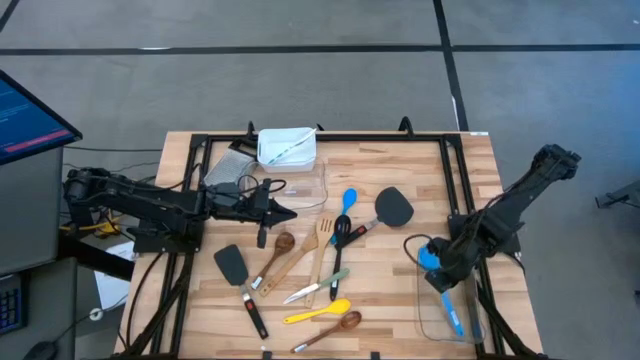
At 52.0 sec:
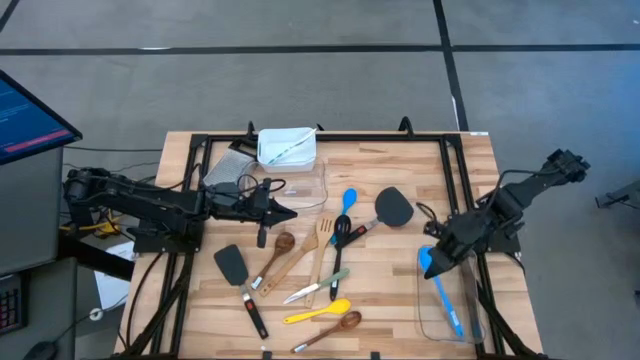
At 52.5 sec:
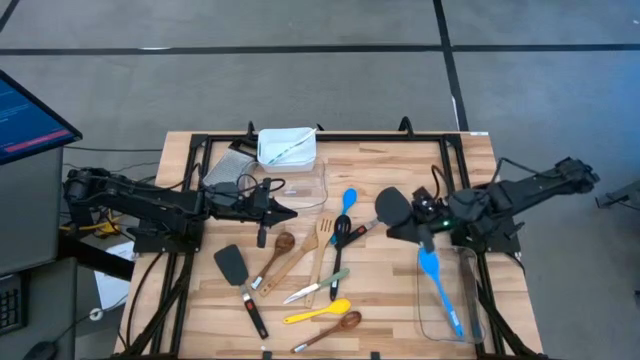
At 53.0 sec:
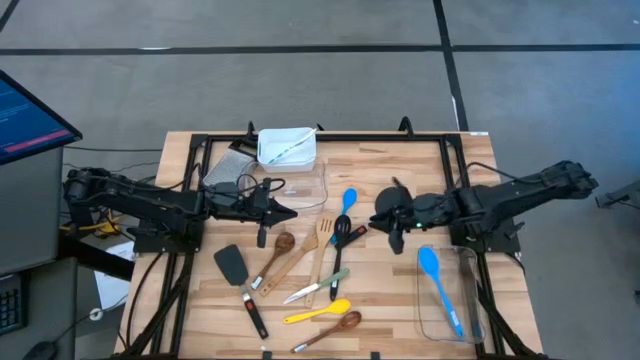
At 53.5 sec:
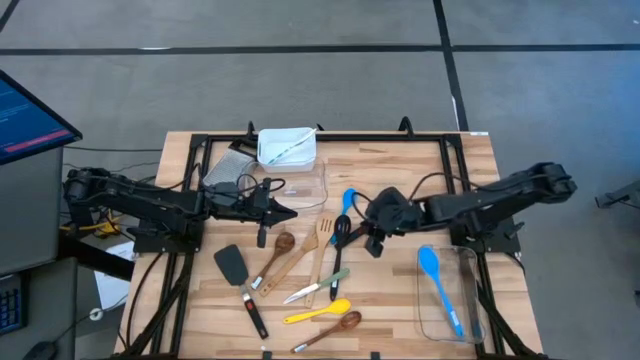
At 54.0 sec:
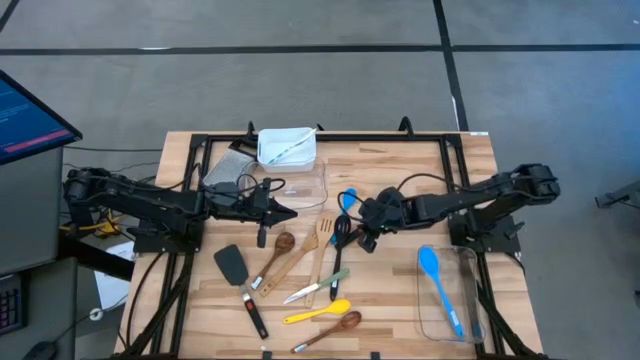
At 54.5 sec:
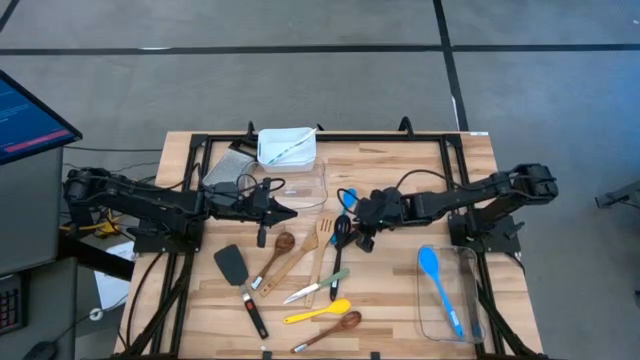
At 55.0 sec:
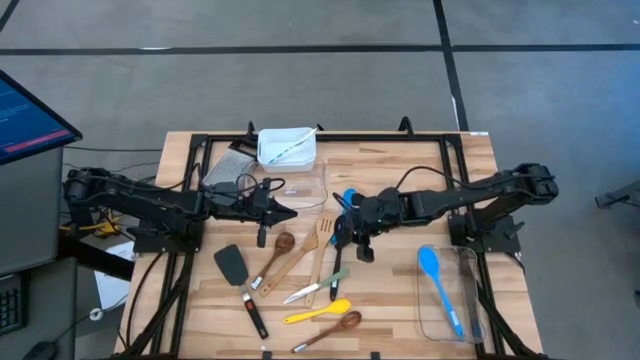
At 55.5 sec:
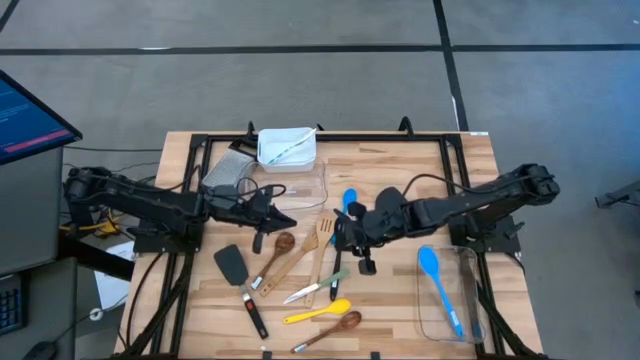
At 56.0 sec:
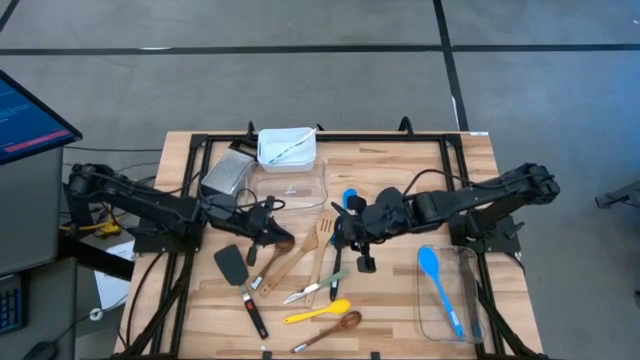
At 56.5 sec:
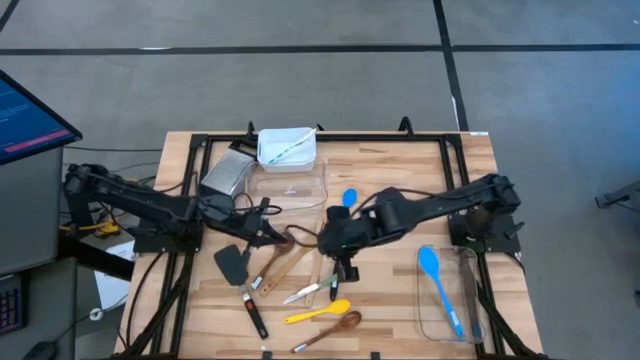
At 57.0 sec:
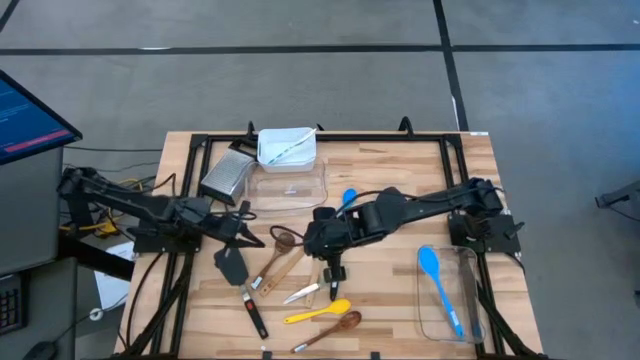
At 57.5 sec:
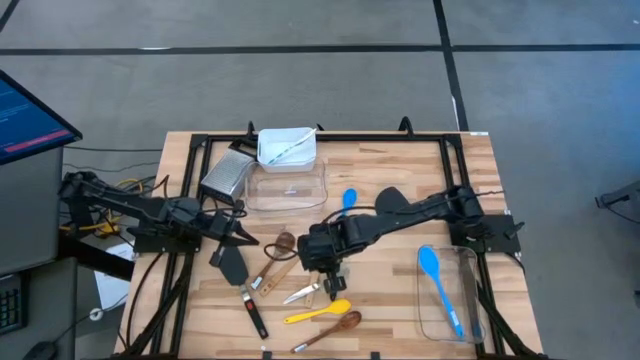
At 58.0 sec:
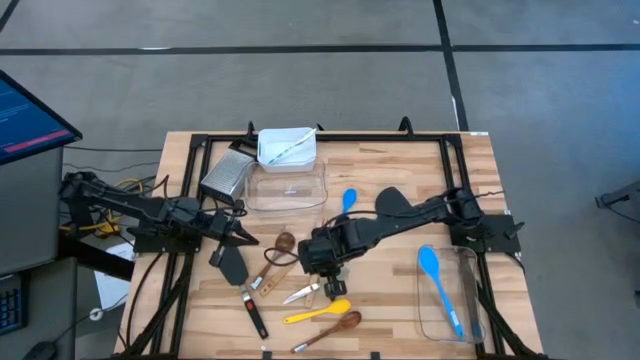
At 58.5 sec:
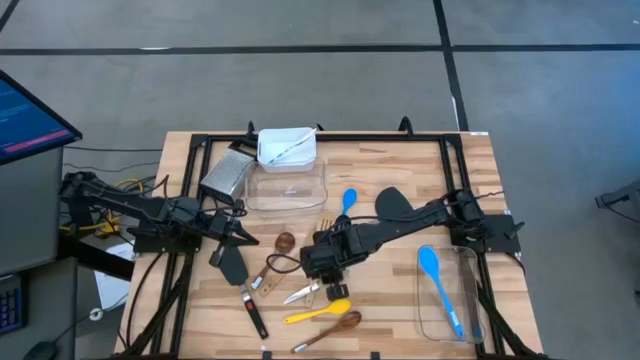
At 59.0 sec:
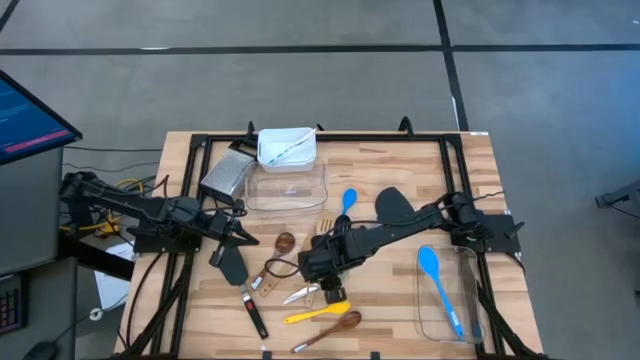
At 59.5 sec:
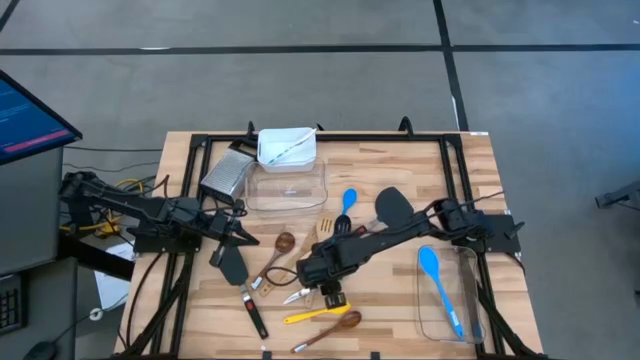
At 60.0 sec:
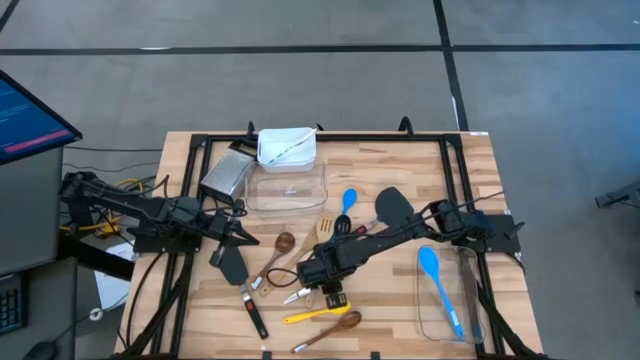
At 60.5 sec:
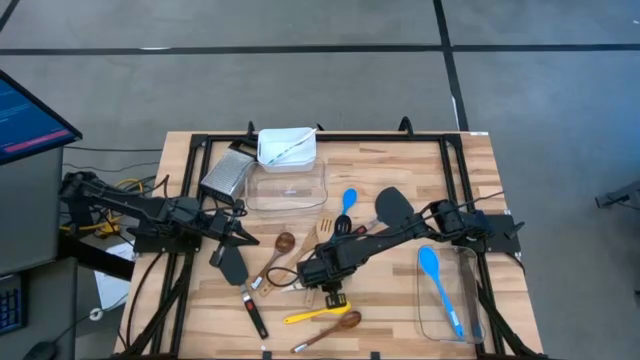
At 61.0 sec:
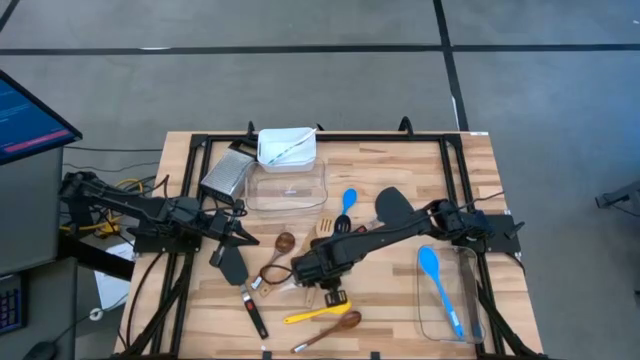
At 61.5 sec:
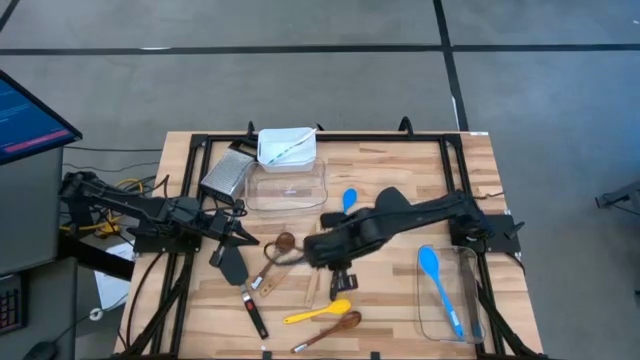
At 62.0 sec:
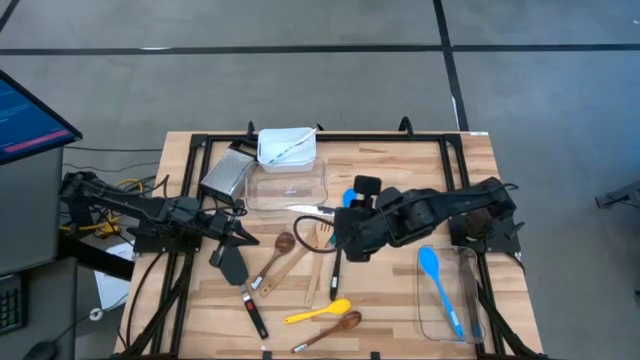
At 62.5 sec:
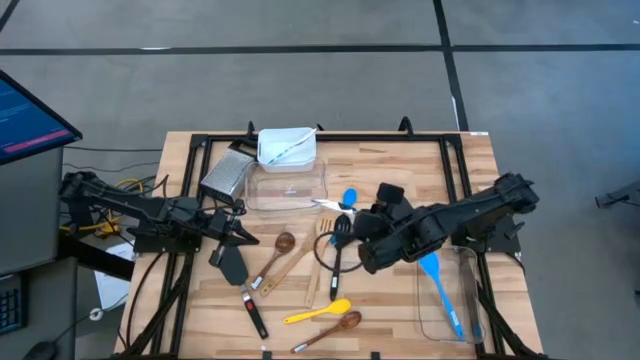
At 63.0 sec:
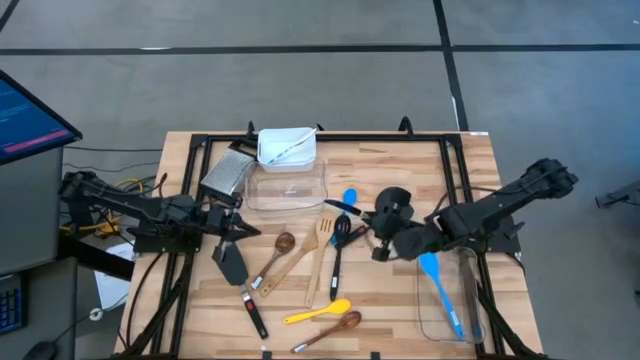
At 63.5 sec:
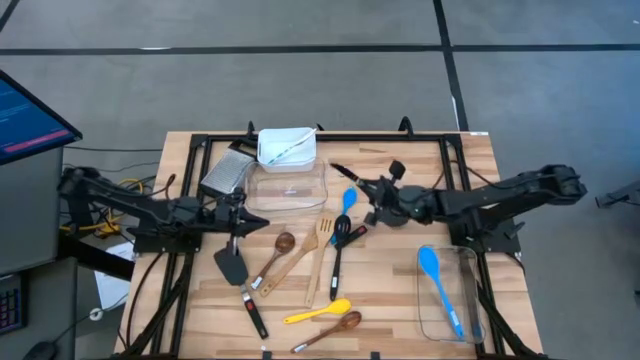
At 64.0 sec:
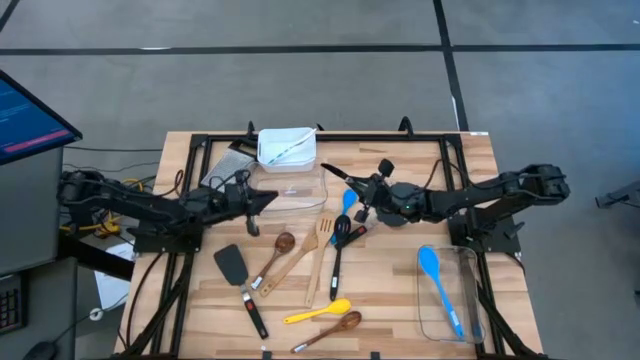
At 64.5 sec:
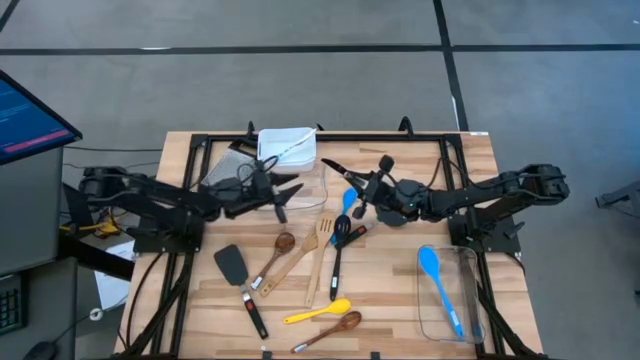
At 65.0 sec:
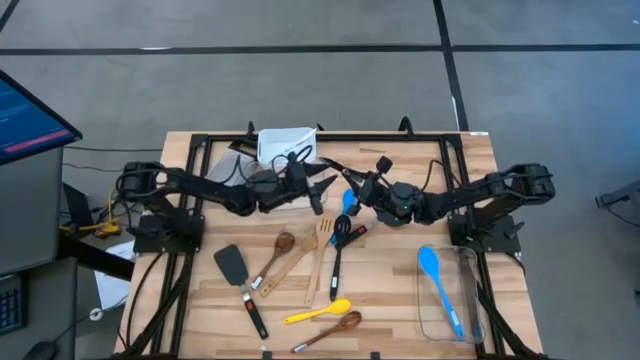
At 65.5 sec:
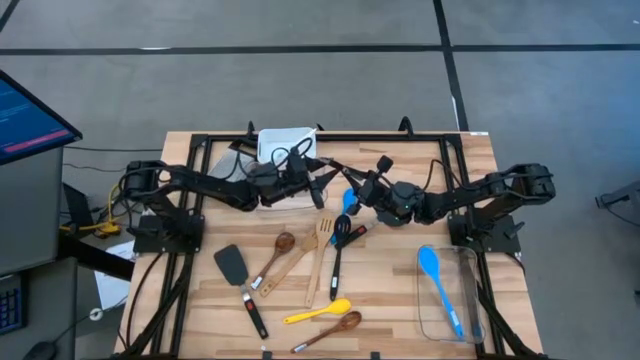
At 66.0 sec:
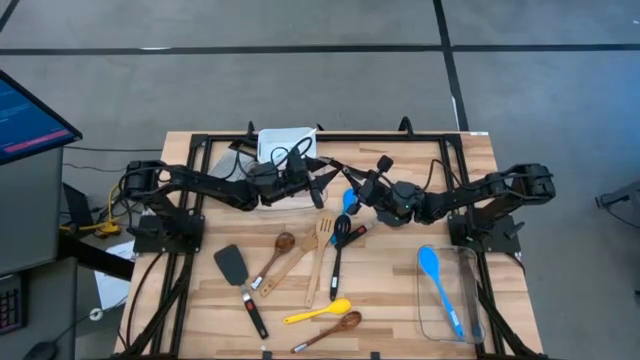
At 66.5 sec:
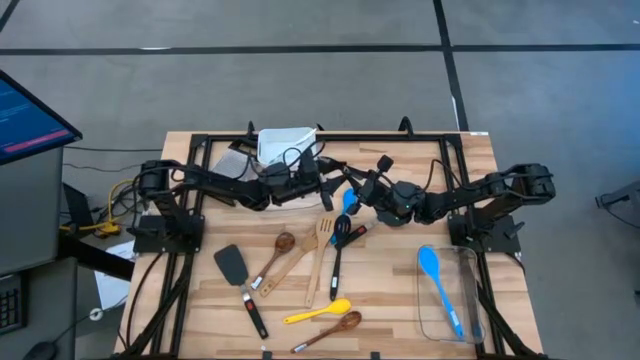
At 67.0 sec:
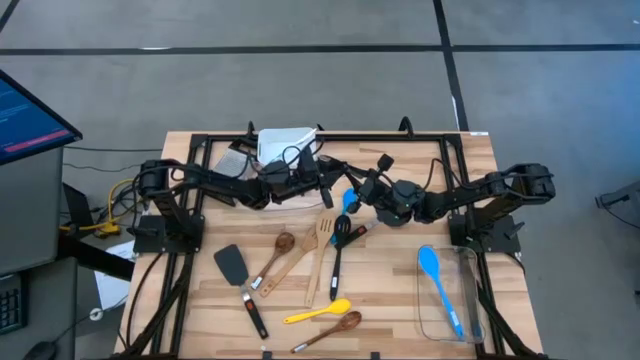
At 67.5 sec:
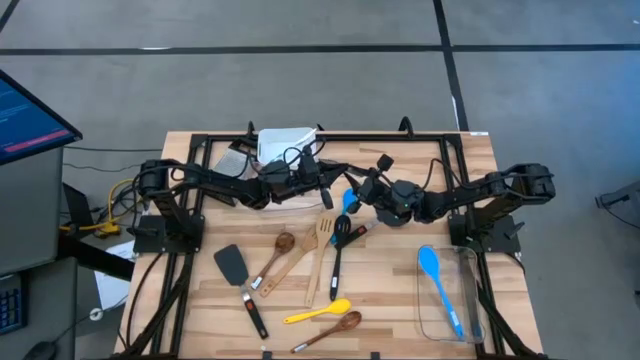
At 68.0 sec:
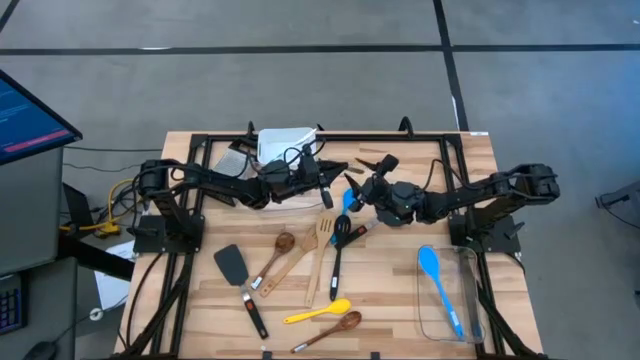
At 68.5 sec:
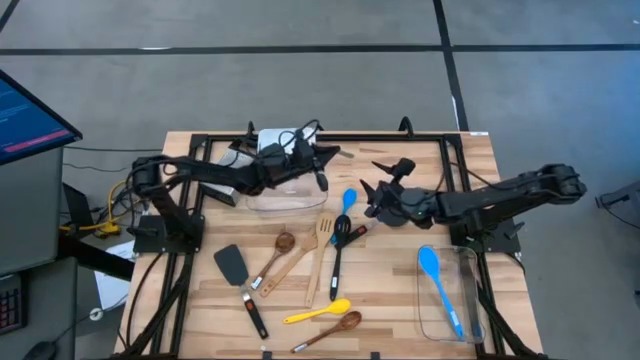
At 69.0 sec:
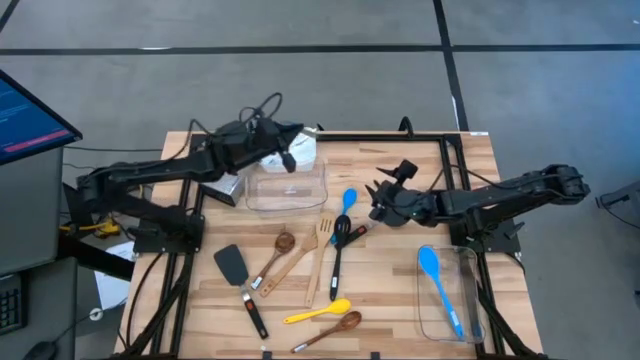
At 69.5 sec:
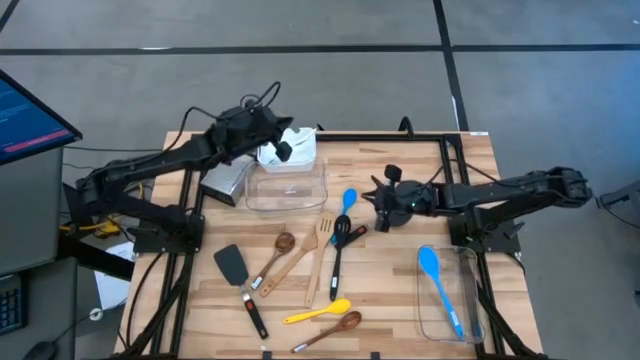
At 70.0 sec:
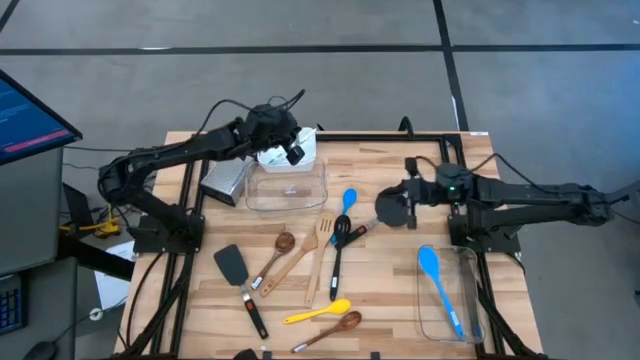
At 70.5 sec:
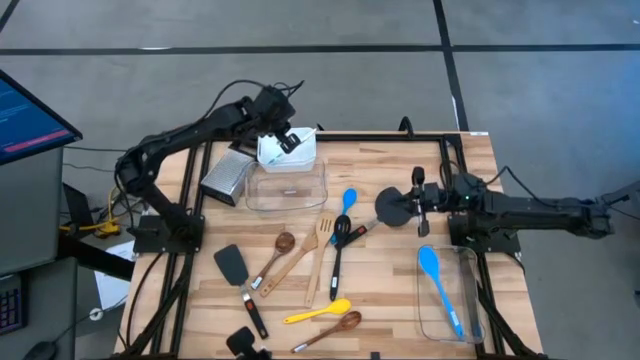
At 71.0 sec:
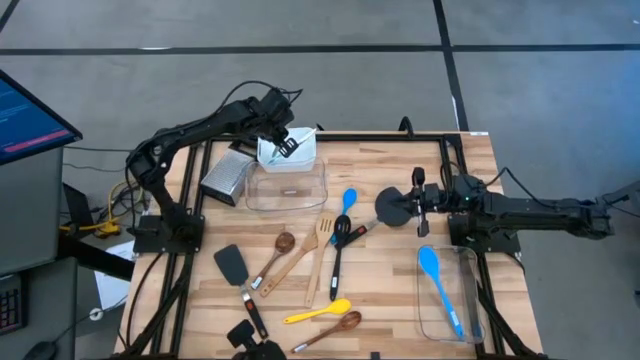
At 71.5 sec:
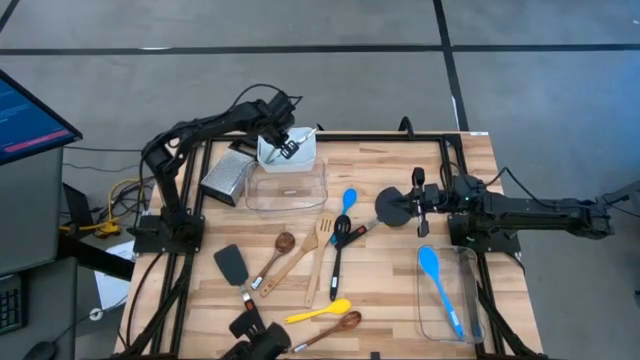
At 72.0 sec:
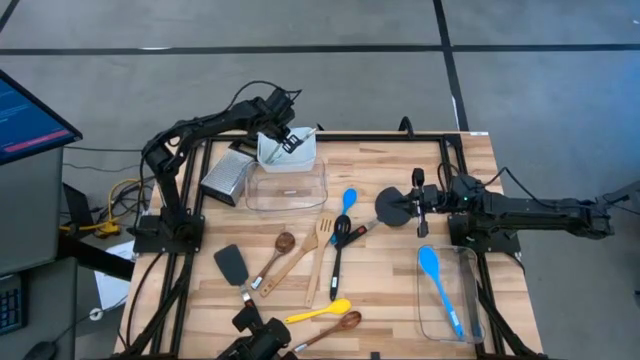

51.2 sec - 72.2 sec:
Task: Pick & Place Kitchen Items
Put the gray table knife into the white bin
